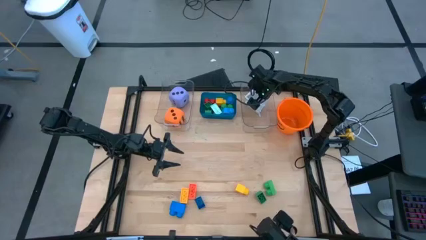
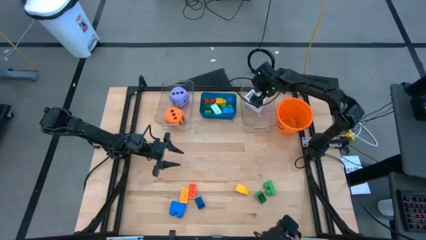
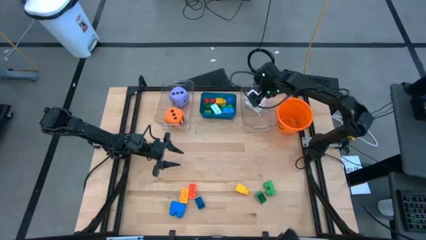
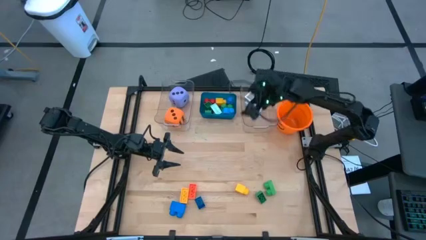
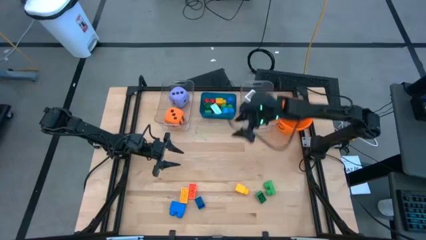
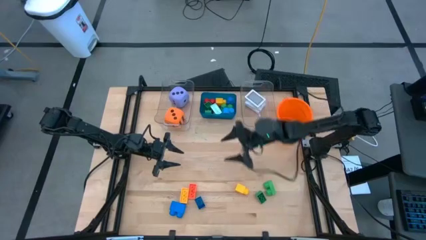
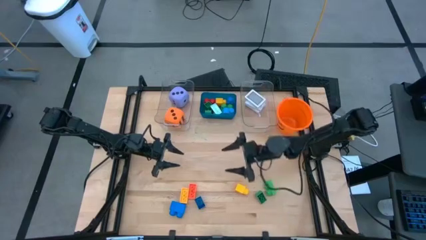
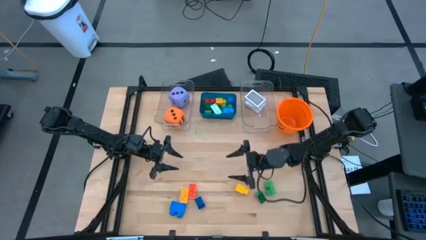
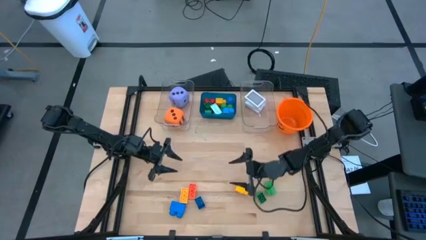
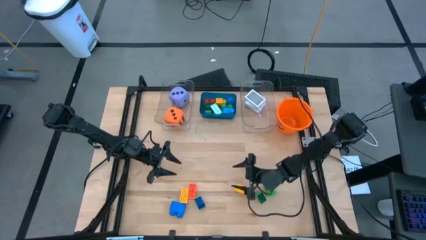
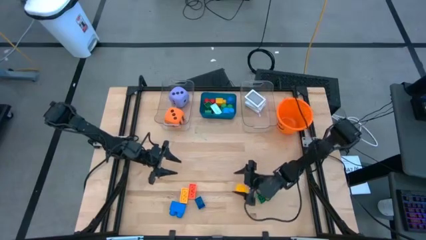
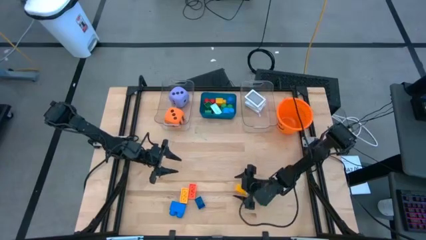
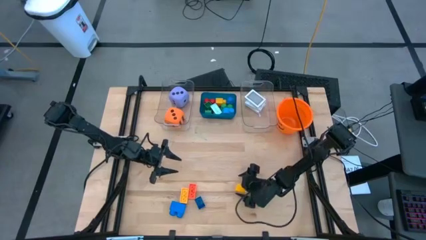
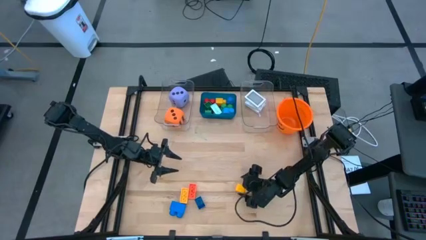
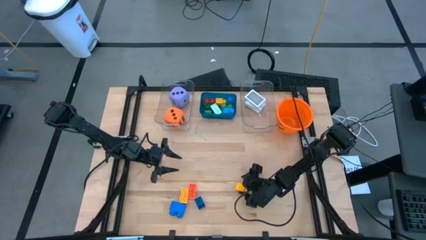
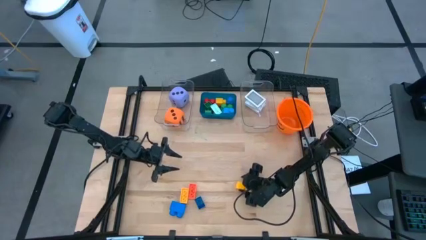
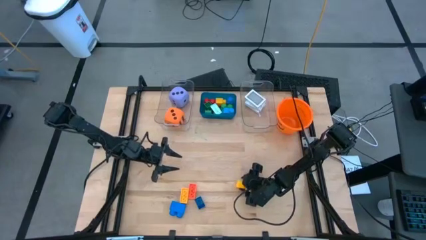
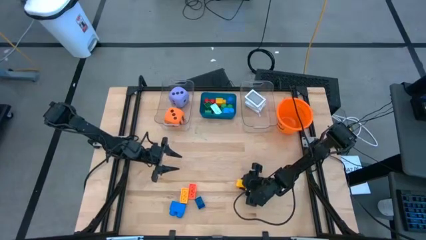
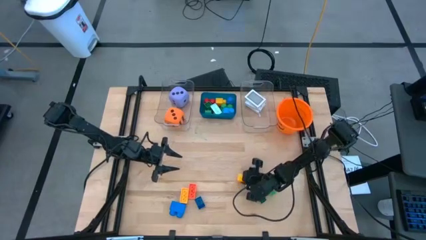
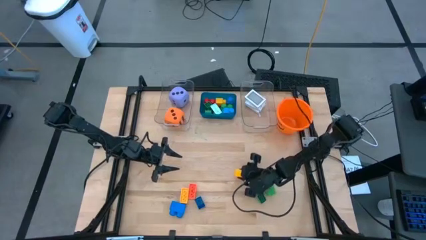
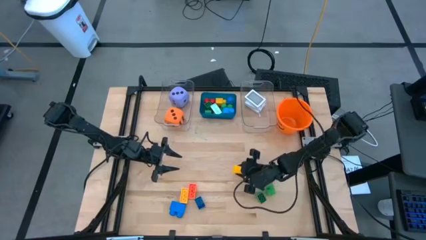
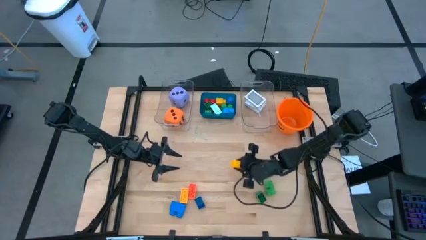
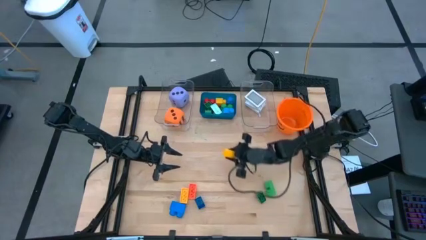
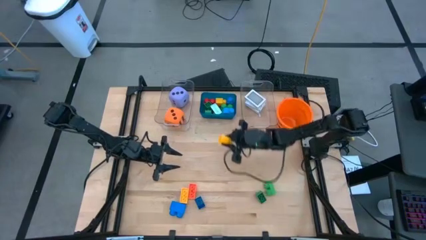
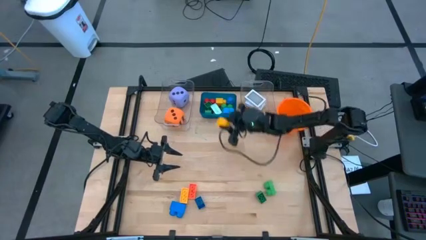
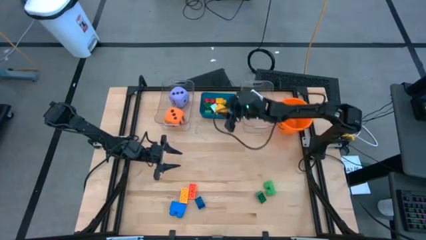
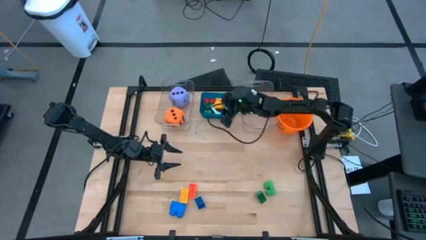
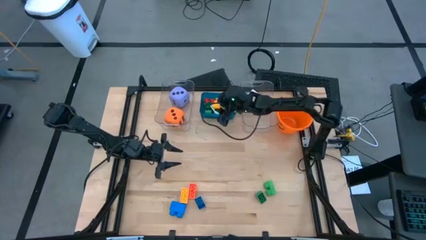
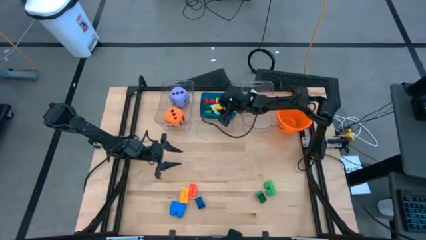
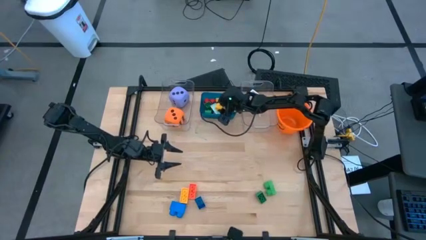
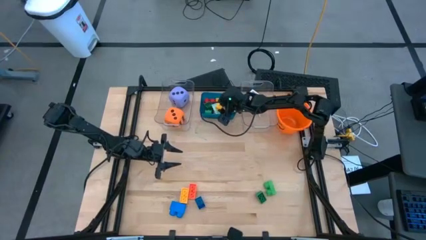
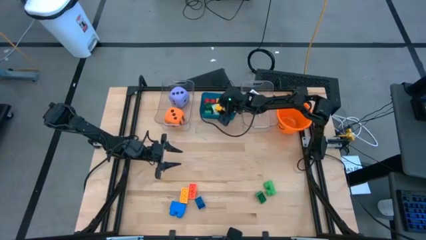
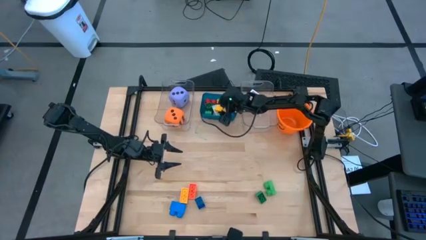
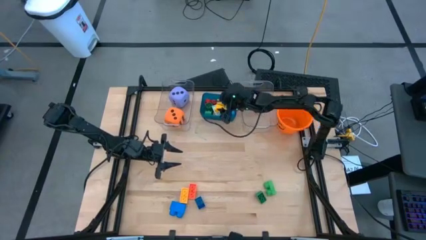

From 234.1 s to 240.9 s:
Task: Pick & Place Toys
Put the yellow game piece into the blue bin

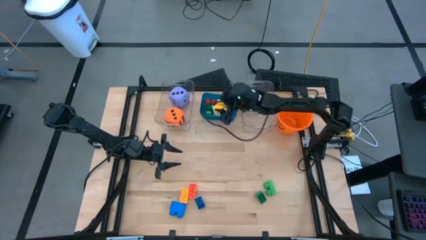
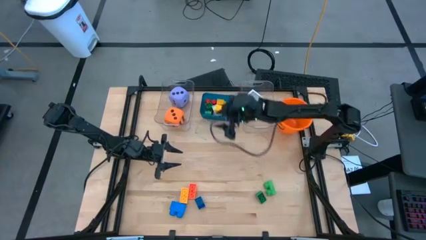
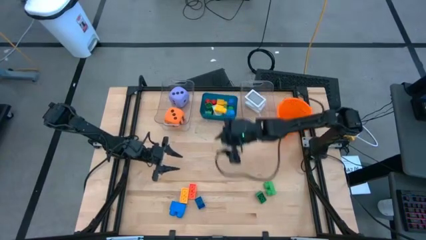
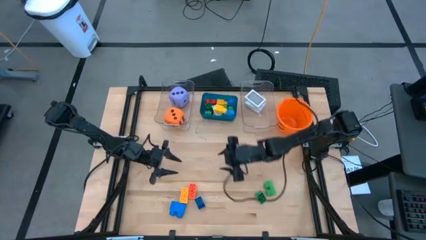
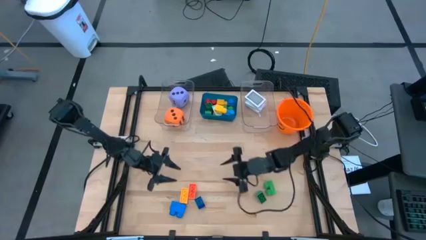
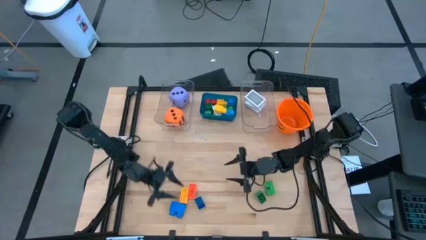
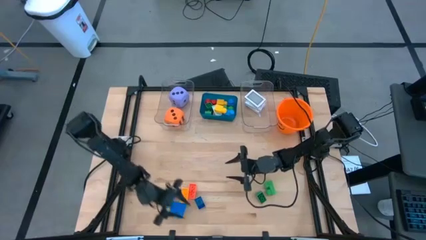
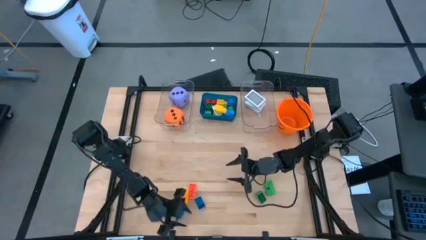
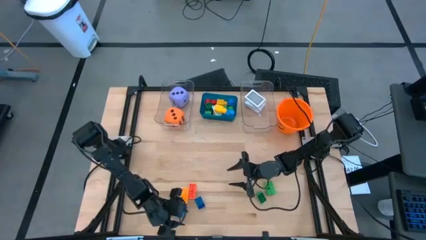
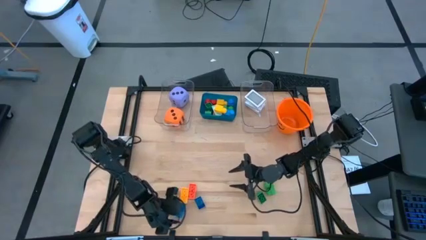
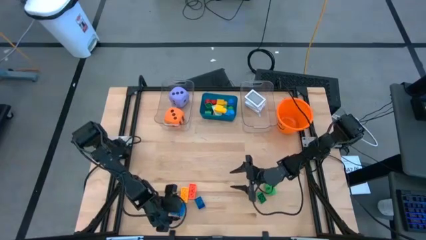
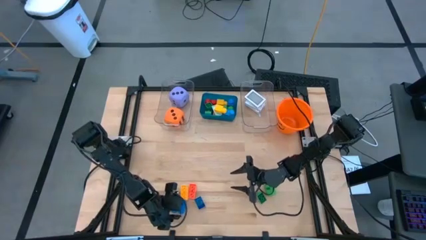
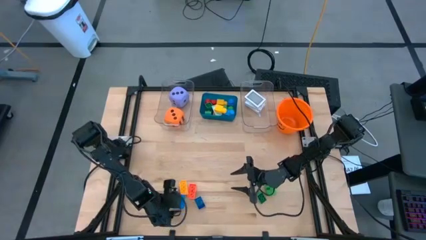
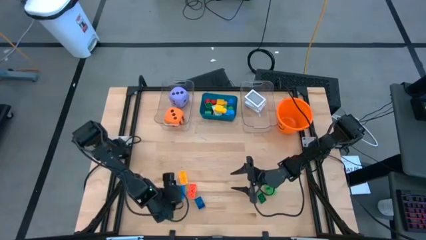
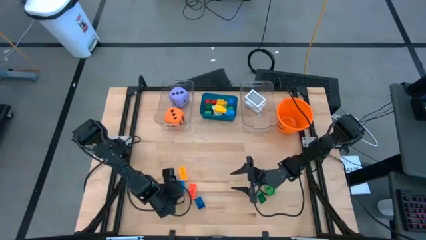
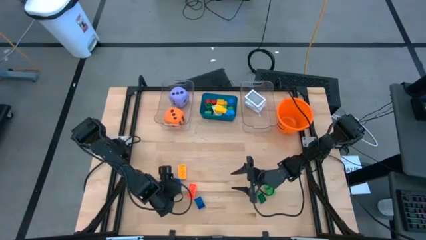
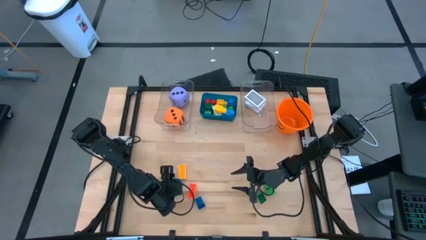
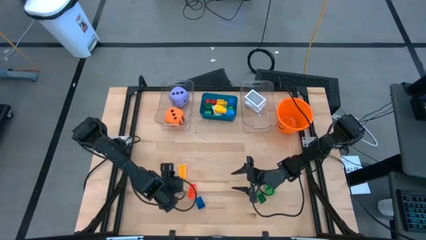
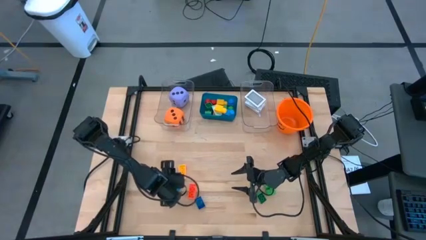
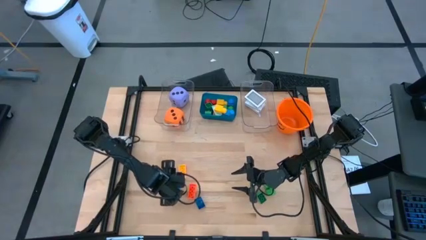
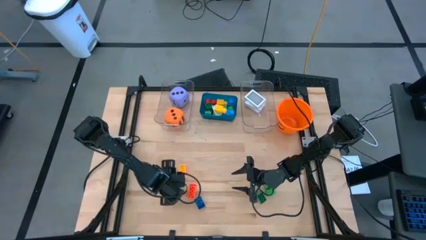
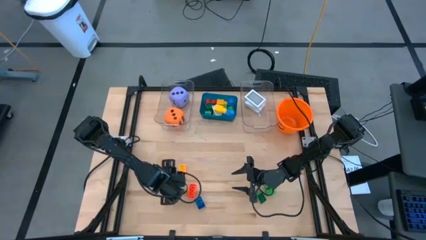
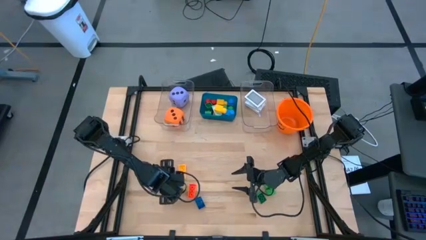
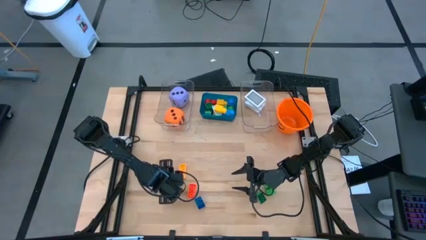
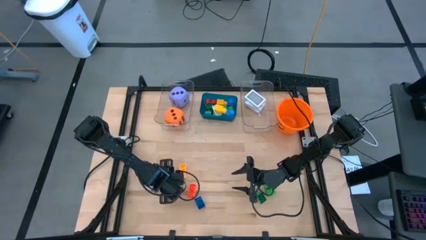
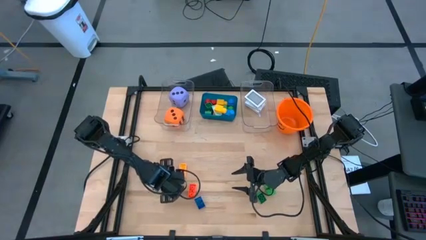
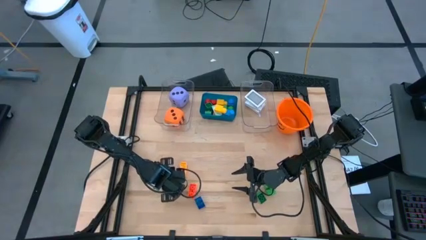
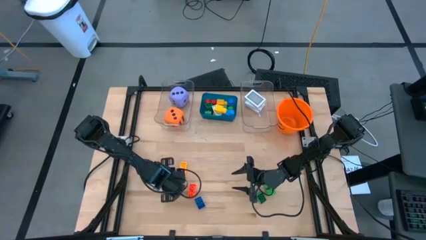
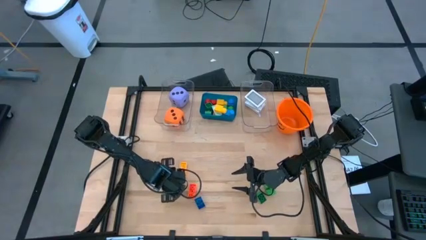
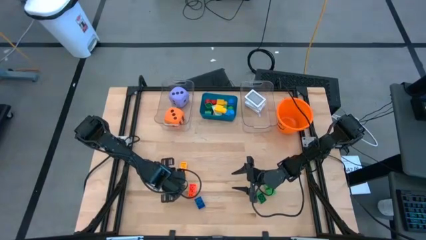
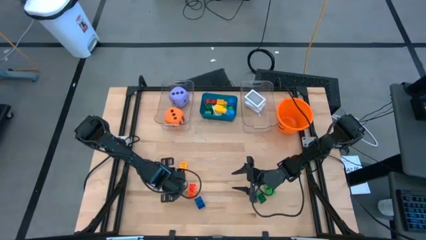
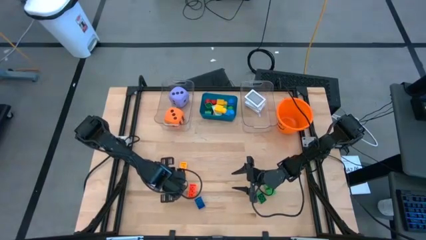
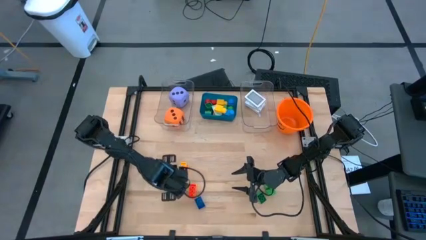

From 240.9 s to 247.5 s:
Put the blue game piece into the blue bin

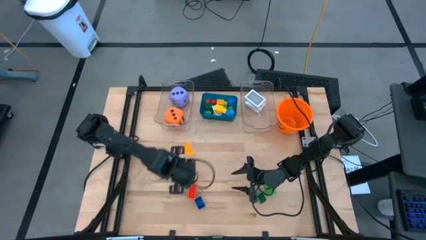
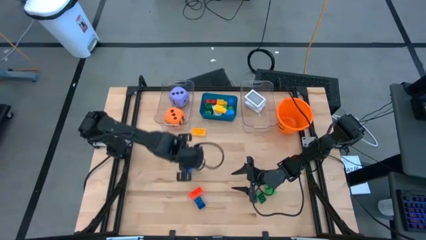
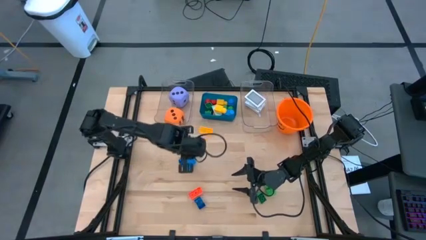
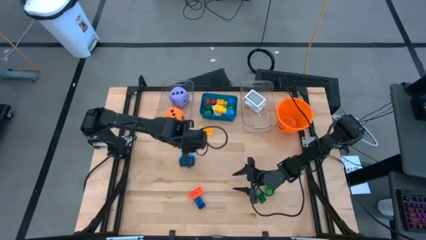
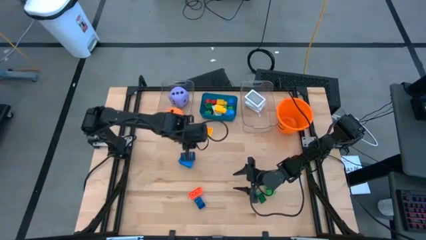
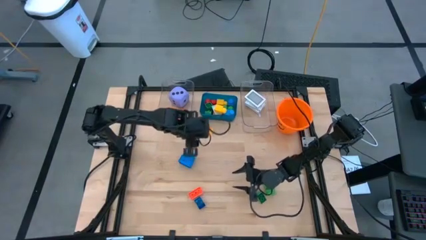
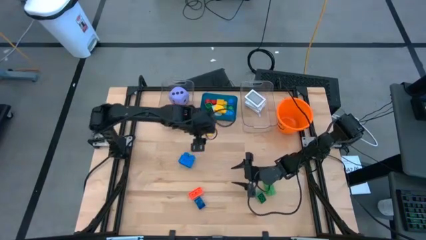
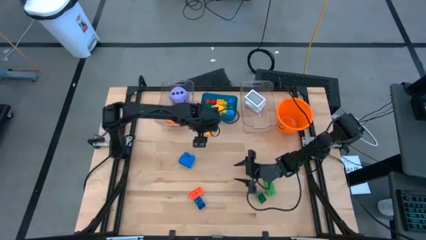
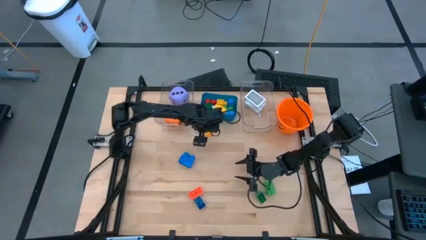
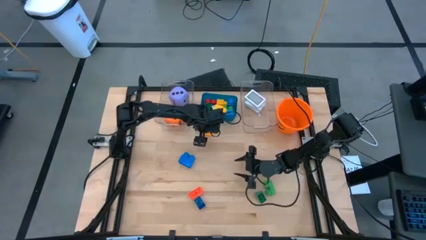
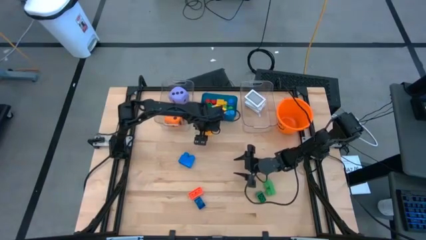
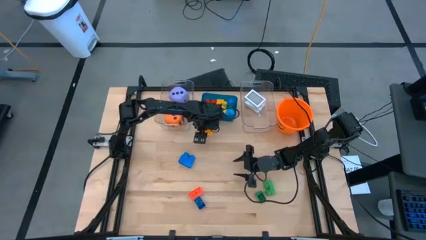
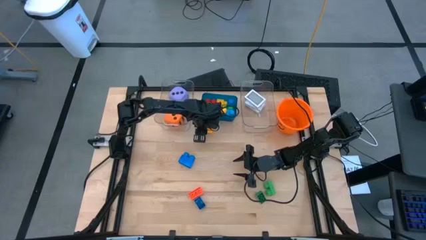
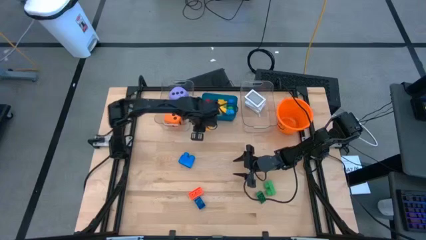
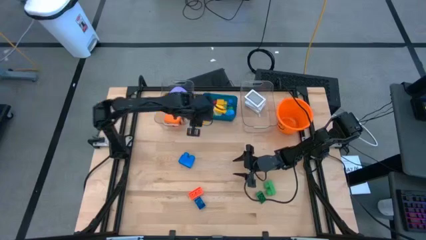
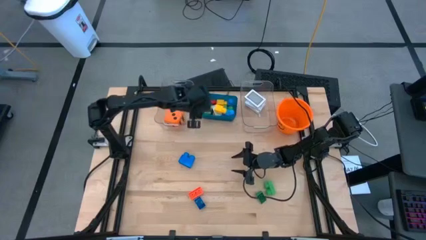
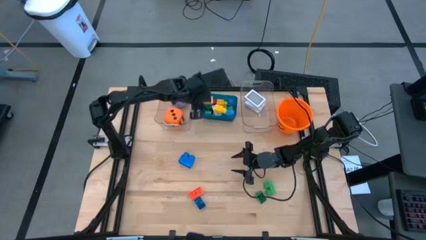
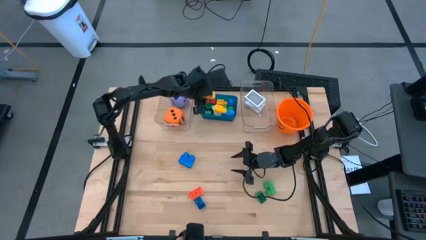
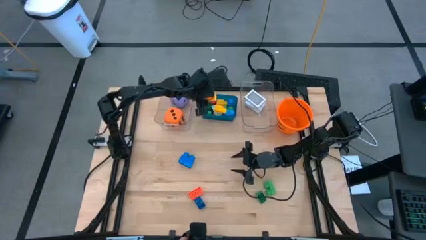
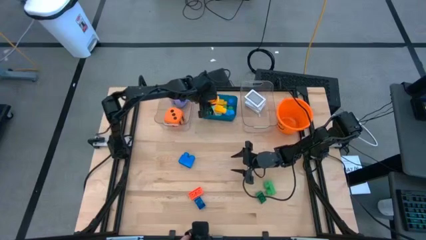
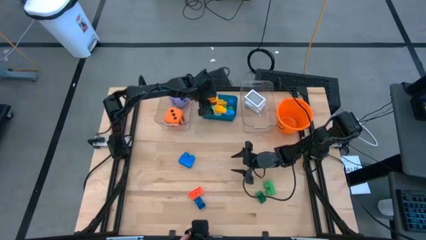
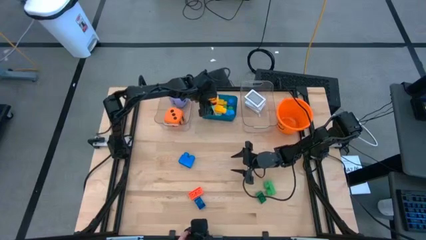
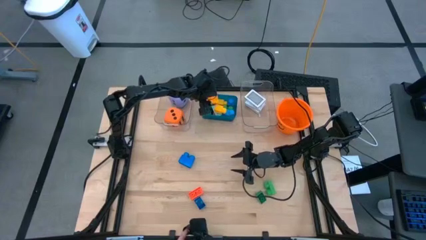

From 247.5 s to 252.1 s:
Put the yellow game piece into the blue bin
